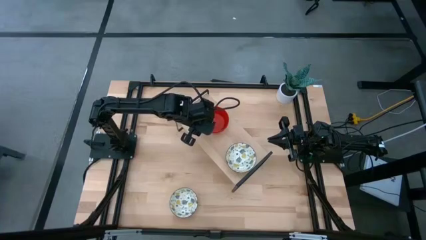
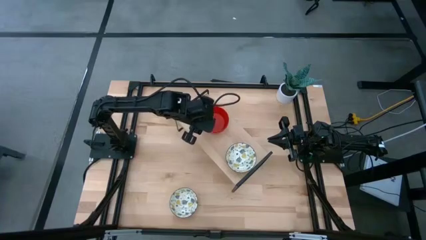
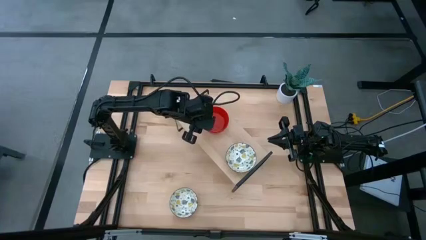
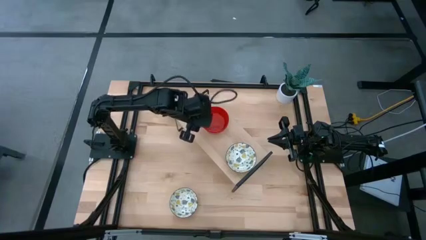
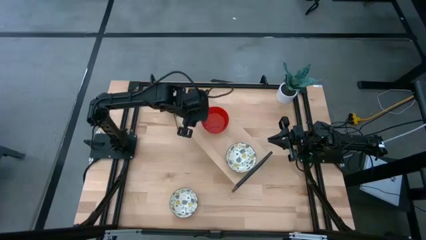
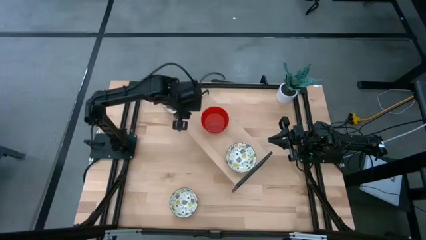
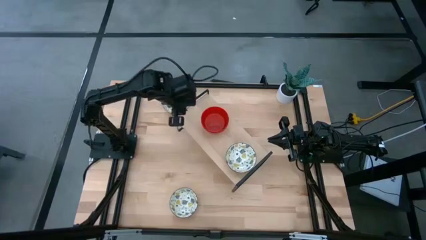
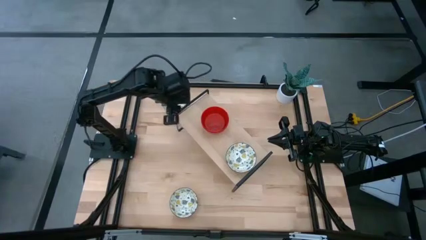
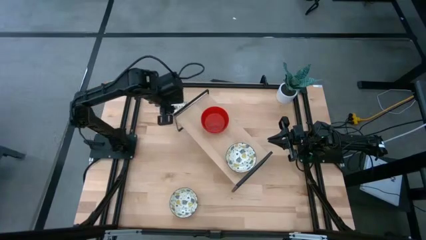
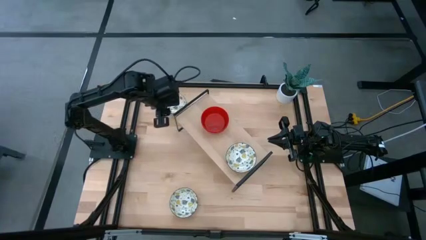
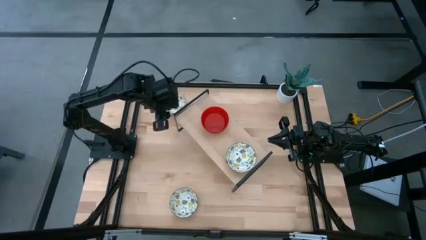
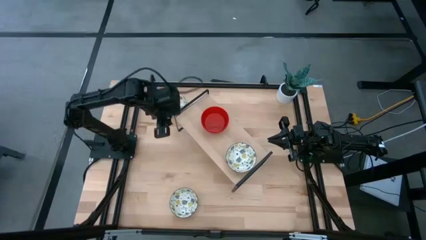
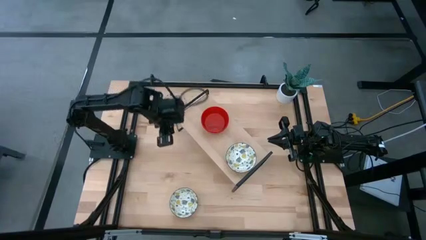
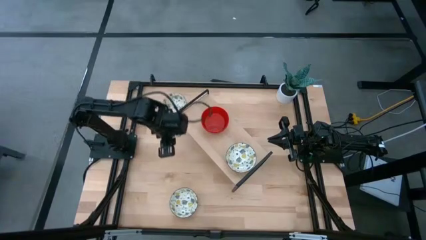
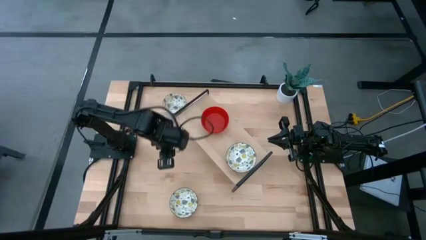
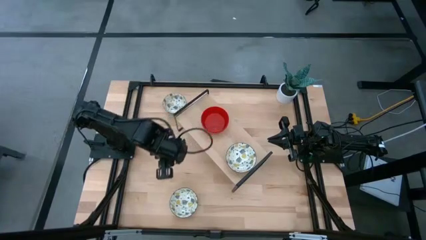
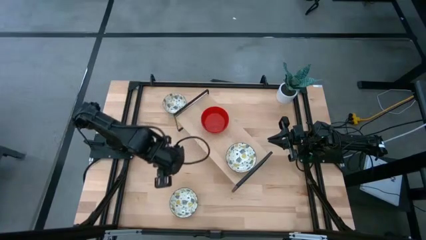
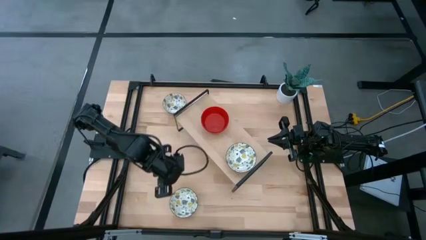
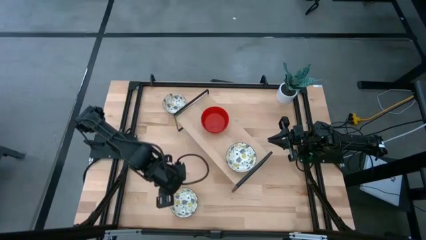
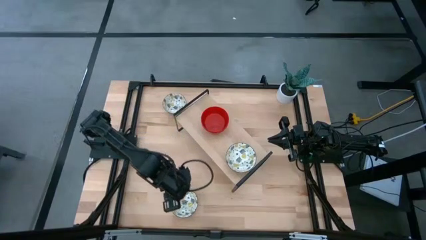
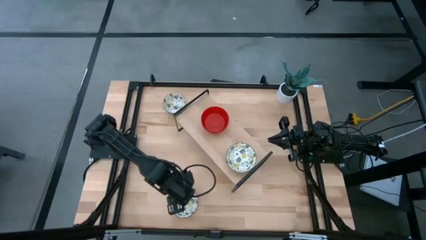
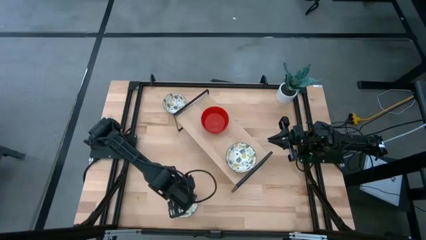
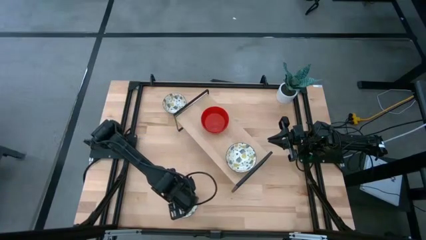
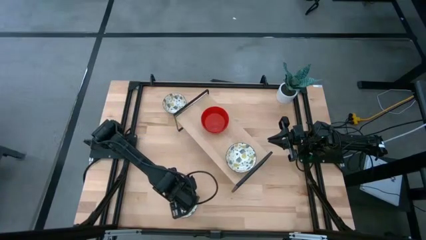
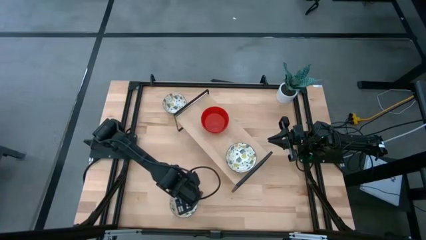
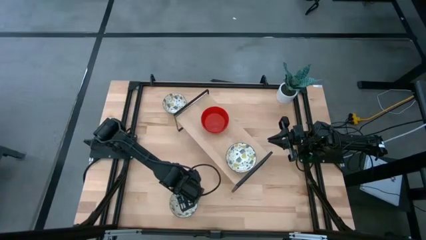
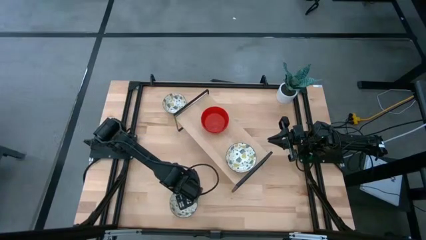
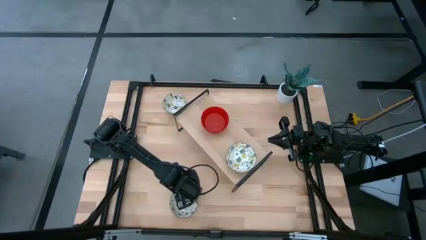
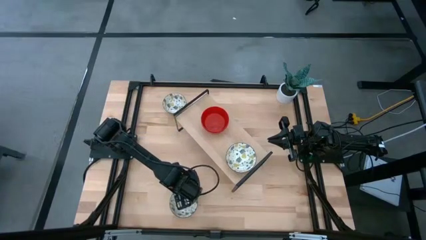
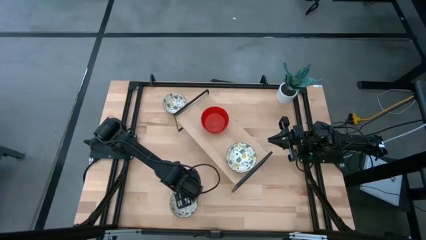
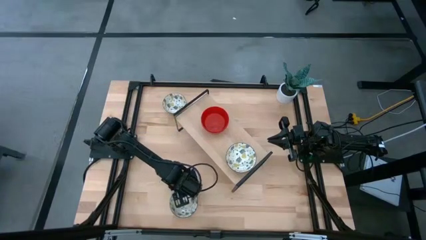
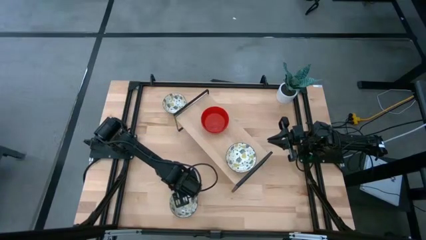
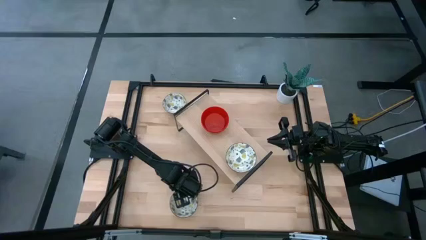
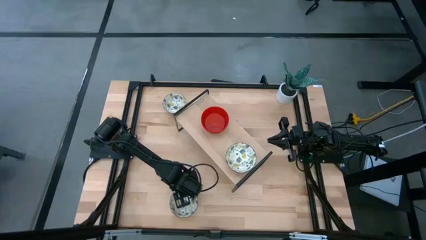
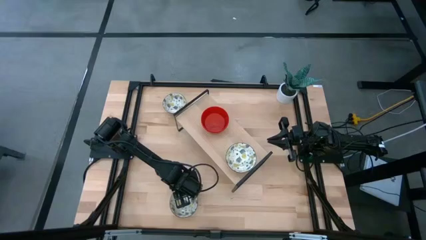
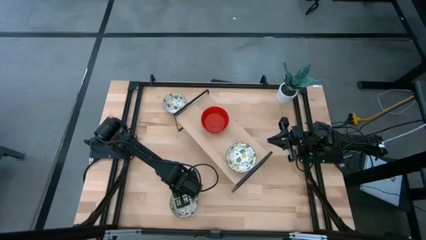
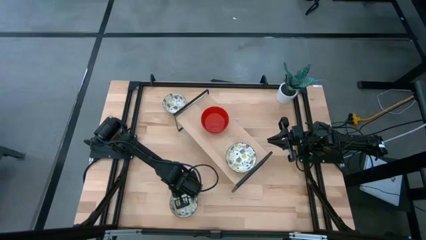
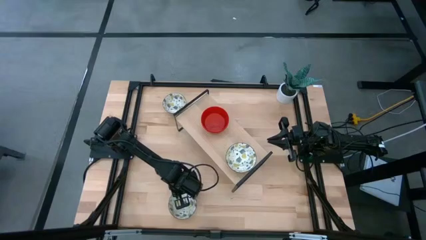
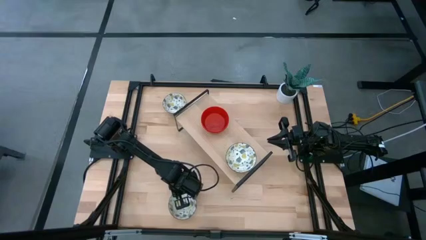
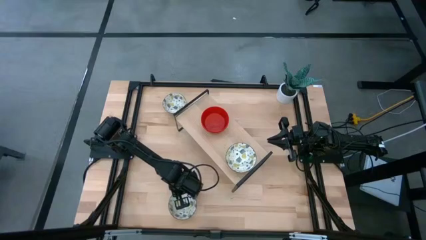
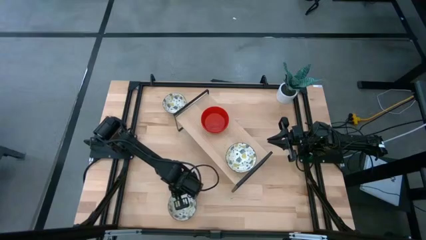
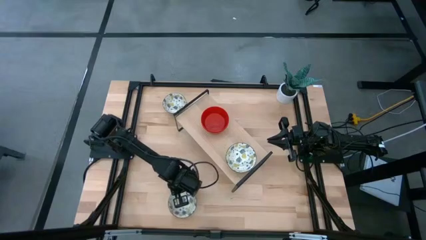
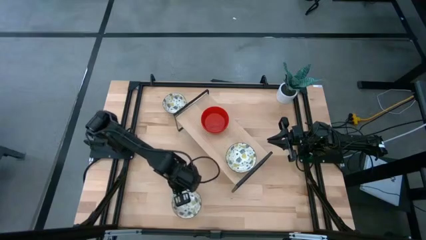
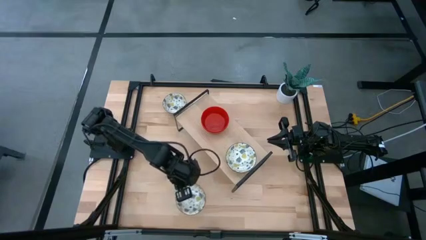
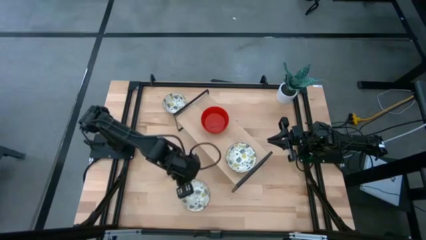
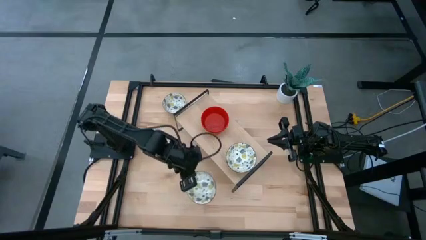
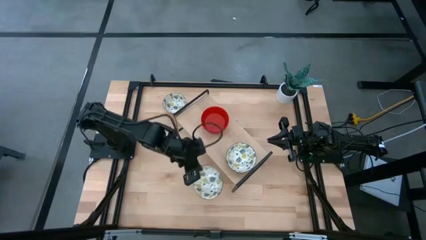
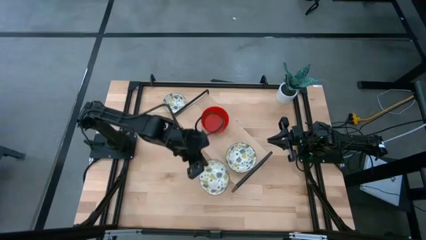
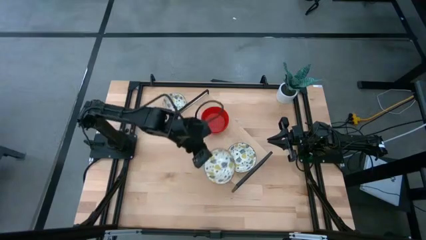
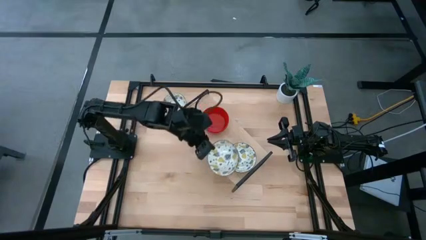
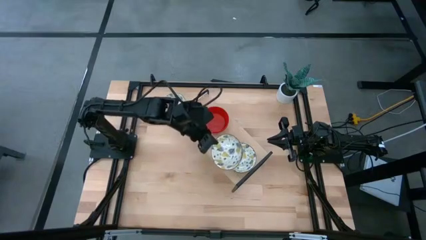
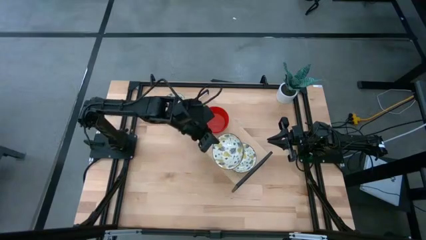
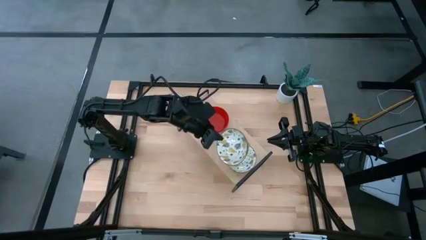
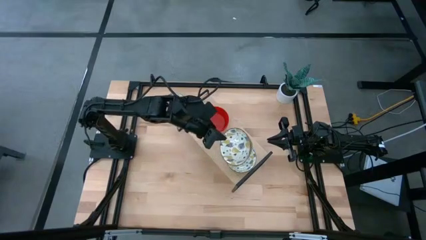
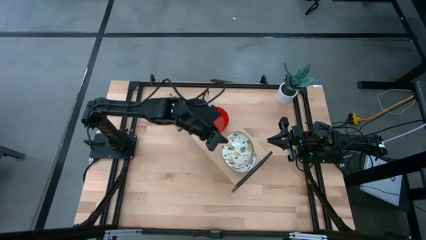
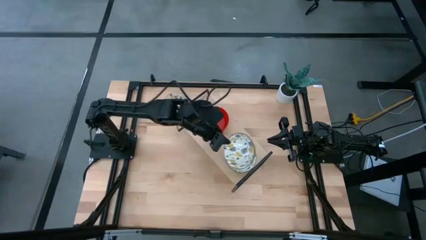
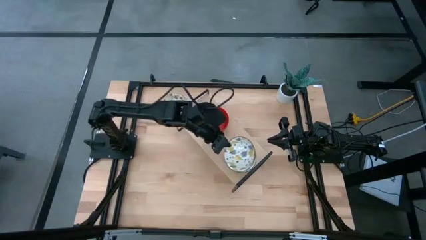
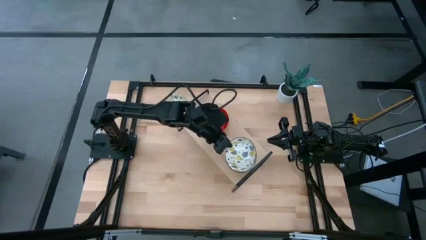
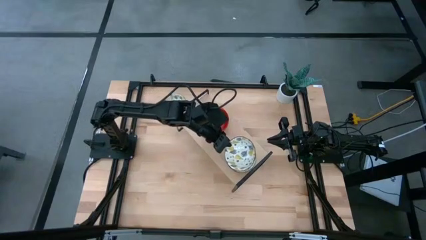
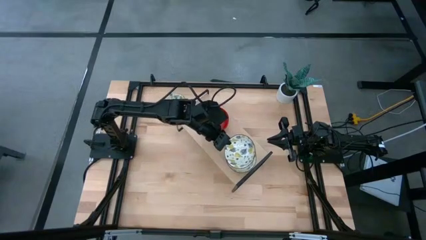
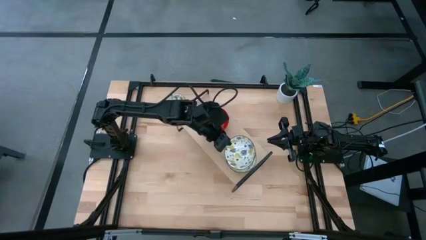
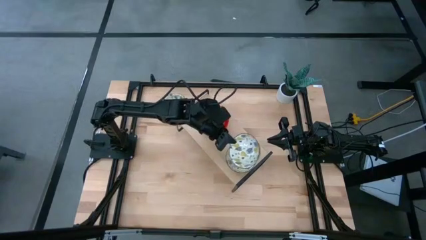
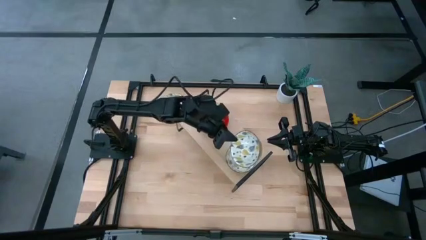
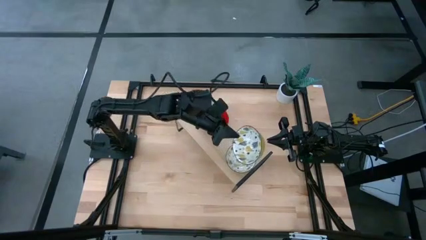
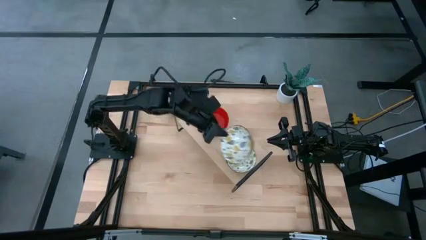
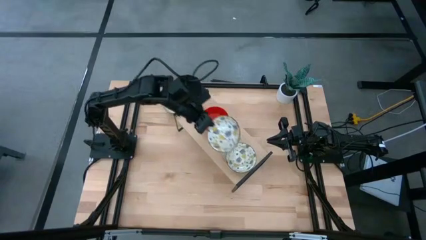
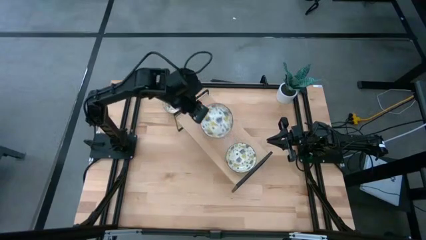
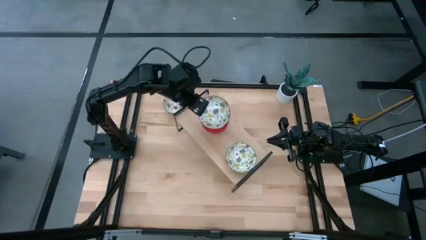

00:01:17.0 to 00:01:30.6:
Task: Pick & Place Mini bowls
Stack the bottom white patterned bowl on top of the white patterned bowl on the shelf
